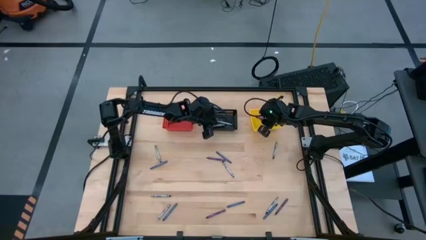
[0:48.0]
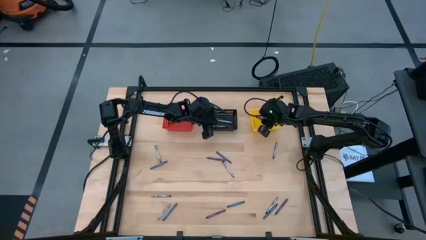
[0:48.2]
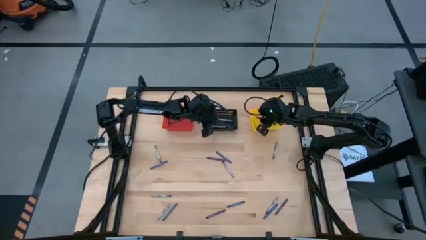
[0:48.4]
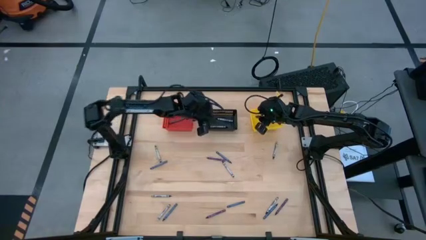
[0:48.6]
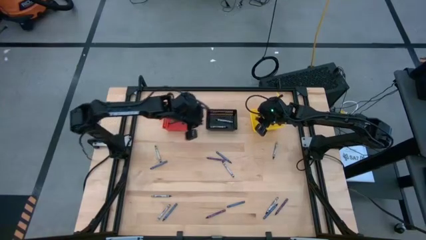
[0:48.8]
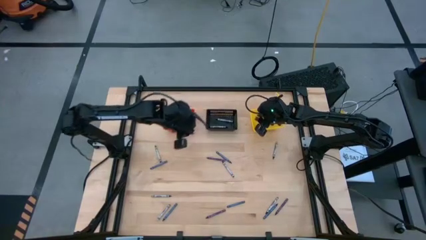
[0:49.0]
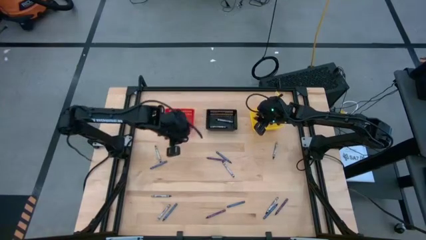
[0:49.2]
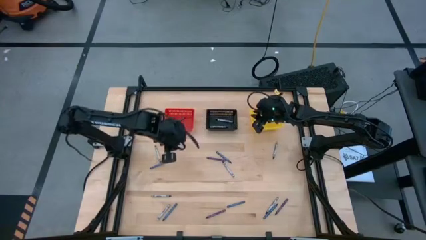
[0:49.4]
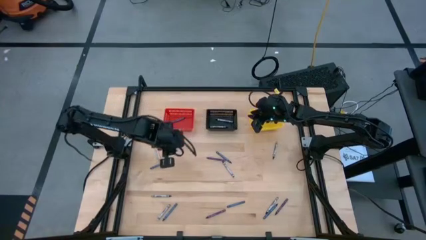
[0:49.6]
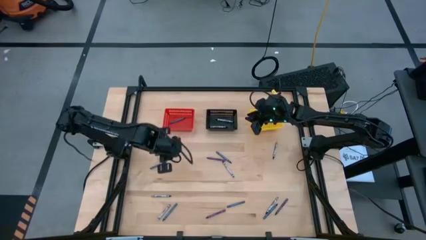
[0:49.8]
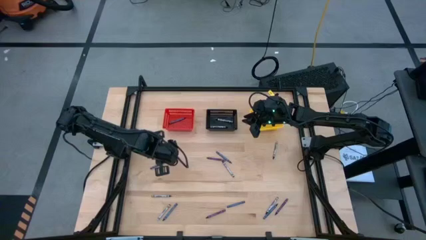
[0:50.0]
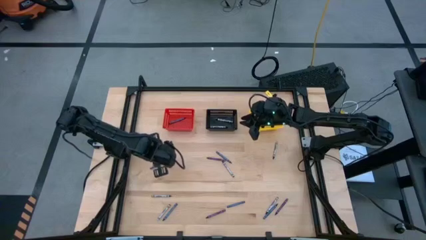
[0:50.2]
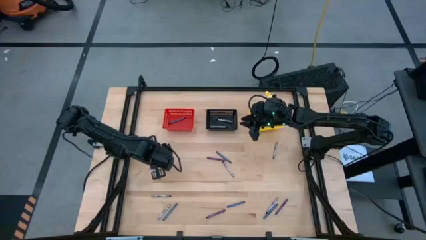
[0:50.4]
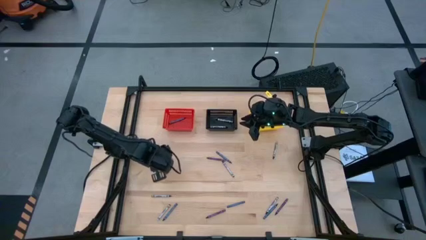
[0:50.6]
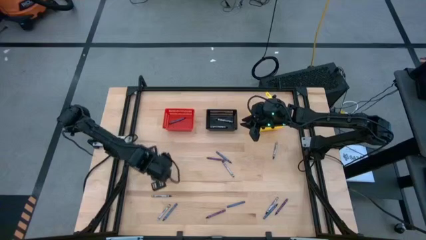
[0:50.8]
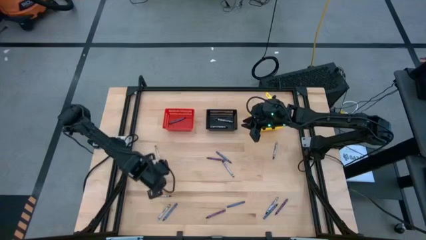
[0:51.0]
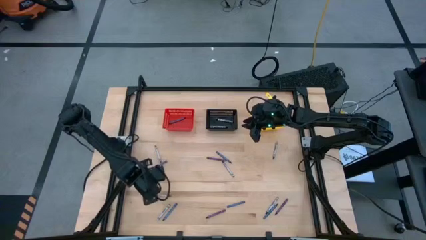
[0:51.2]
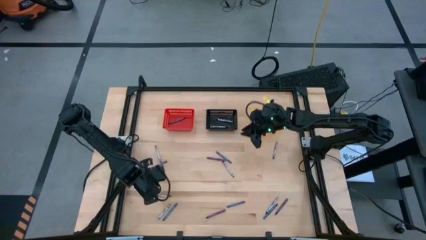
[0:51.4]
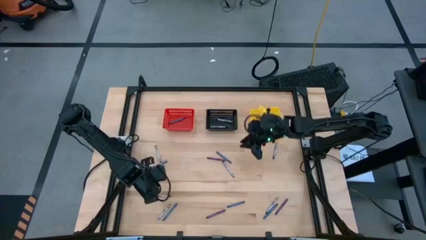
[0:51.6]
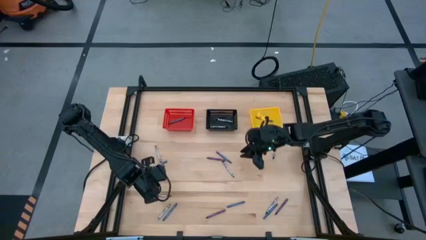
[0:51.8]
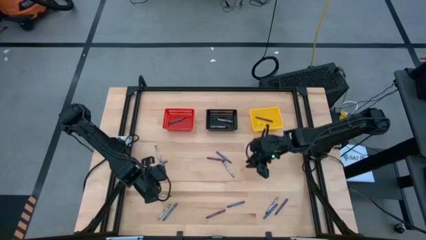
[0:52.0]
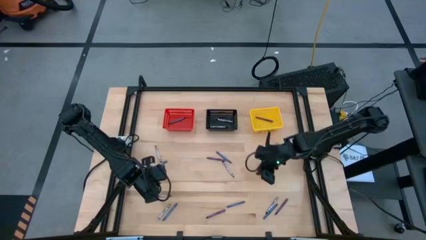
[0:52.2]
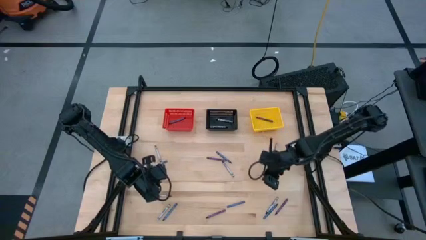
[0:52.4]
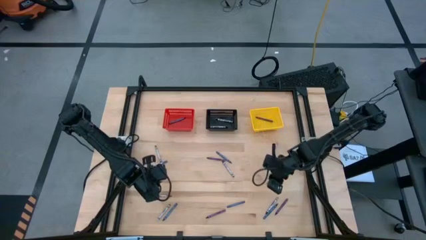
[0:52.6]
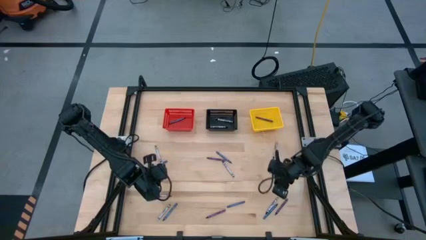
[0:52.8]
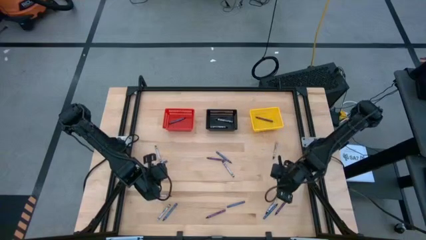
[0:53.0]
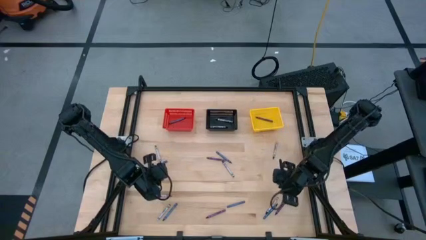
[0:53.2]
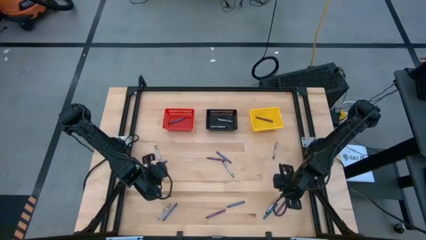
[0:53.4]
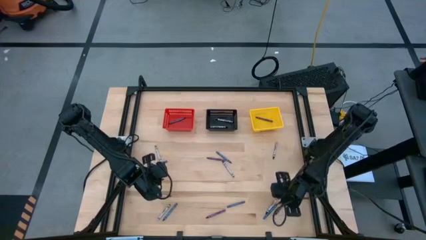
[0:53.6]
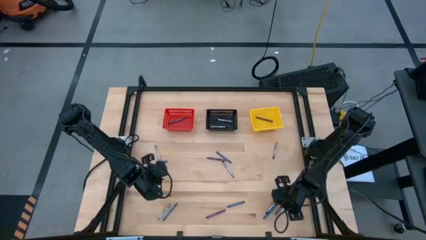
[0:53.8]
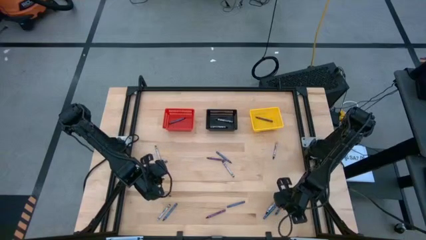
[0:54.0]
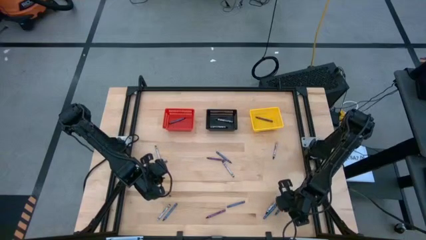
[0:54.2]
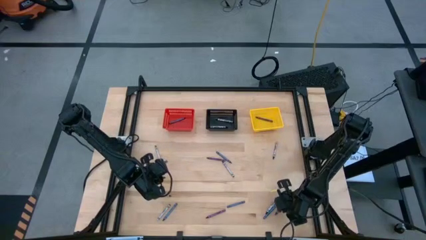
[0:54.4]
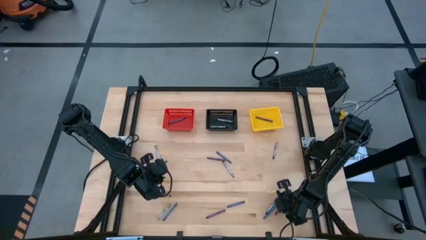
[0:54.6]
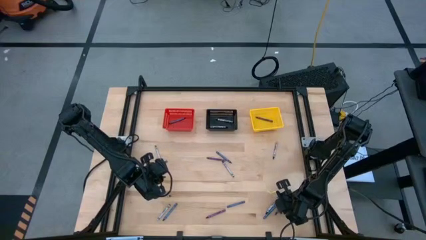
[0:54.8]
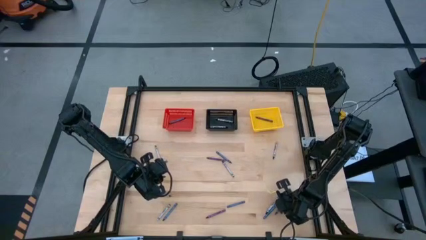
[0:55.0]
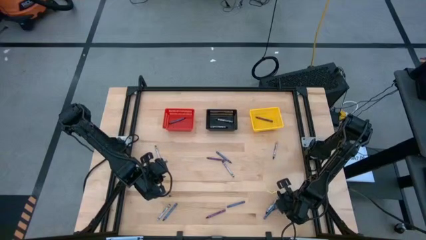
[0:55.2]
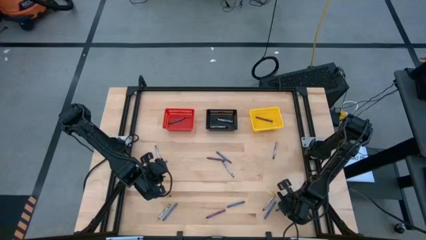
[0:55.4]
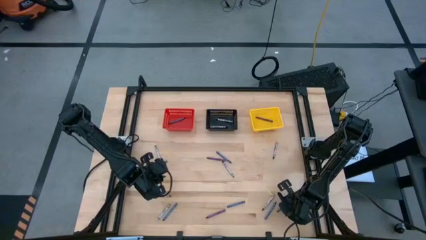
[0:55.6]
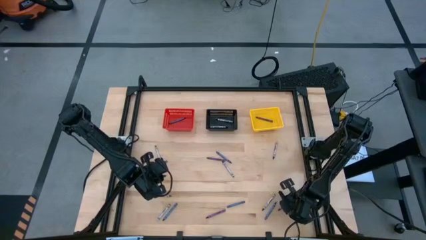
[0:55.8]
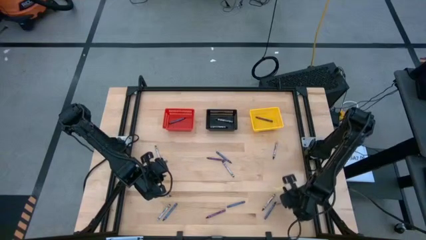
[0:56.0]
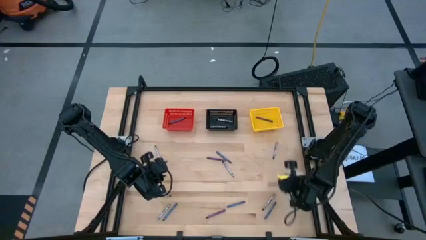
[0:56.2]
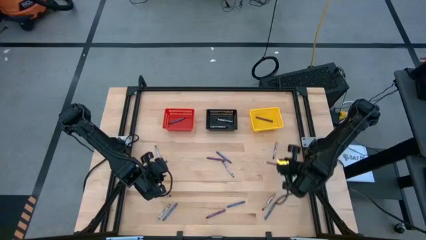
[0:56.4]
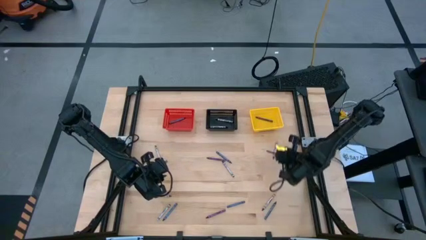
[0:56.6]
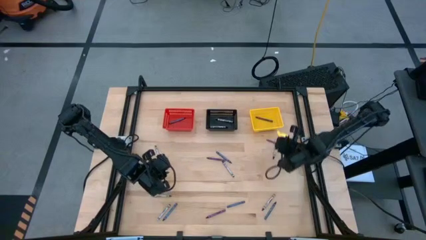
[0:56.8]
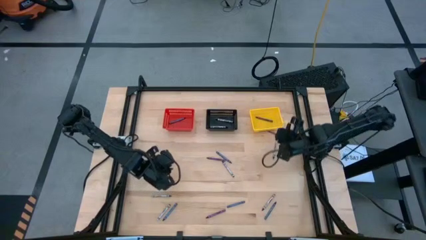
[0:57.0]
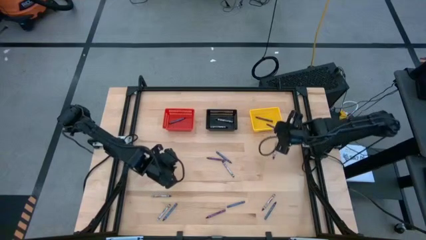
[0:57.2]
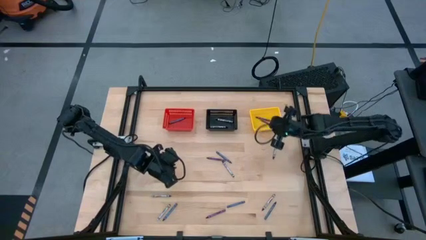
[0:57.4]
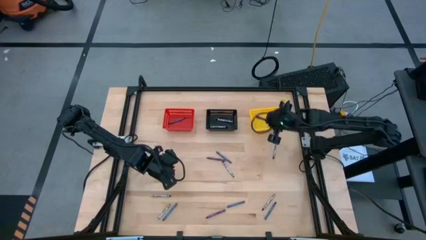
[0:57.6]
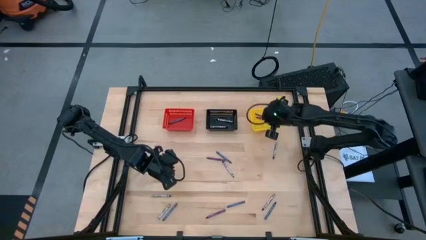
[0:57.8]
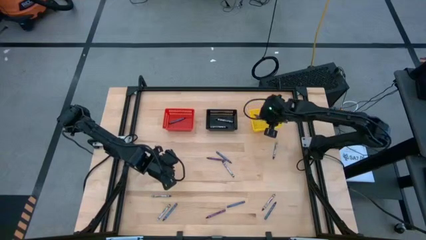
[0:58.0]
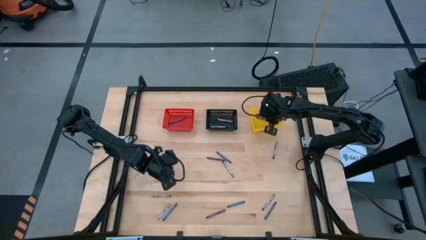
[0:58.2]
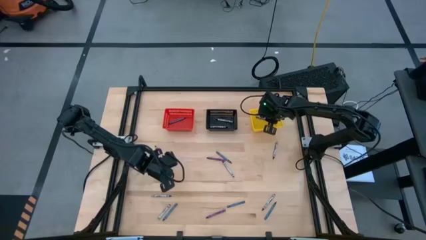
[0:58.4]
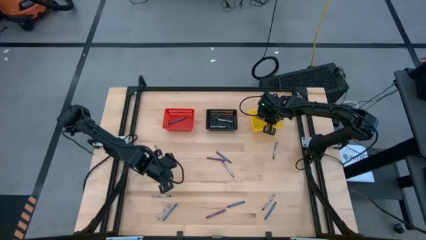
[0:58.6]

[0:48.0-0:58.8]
Task: Sort crayons
Put the purple crayon into the yellow basket

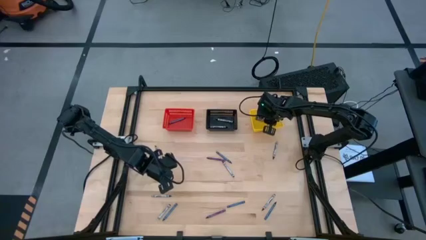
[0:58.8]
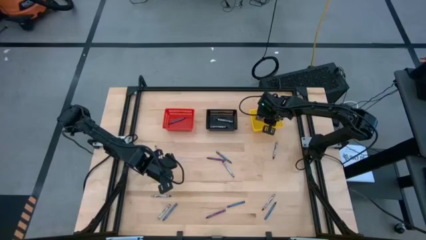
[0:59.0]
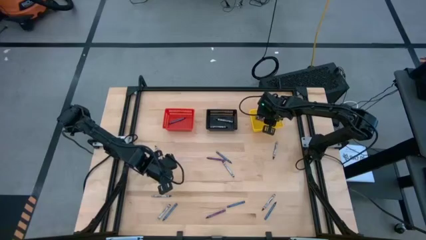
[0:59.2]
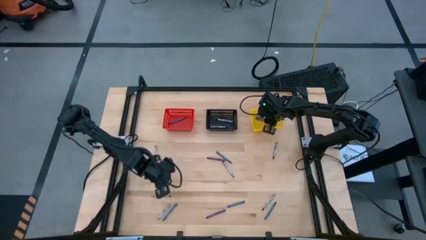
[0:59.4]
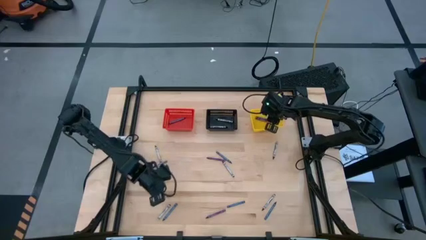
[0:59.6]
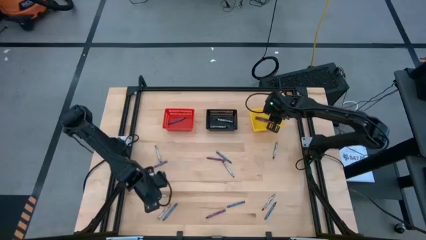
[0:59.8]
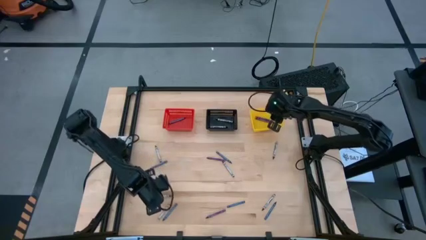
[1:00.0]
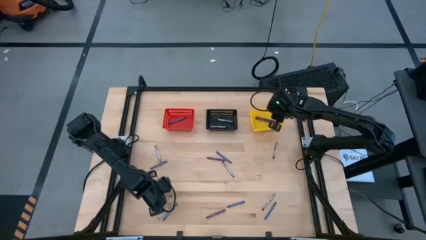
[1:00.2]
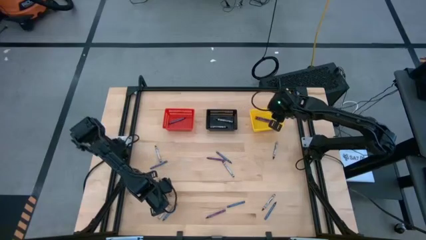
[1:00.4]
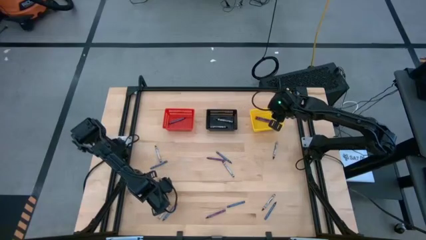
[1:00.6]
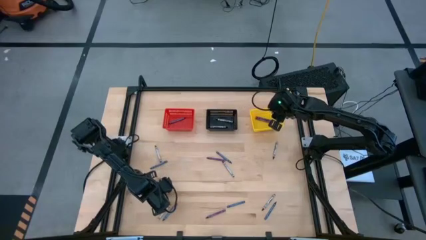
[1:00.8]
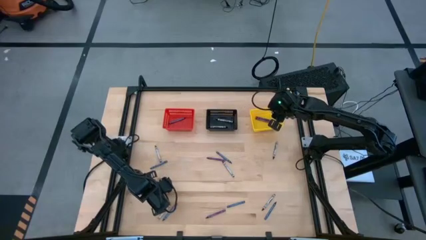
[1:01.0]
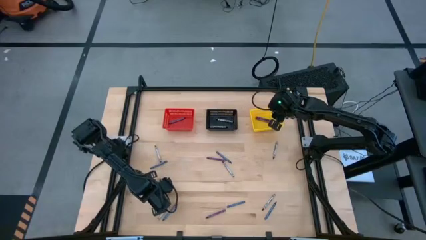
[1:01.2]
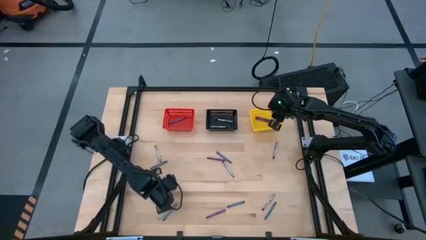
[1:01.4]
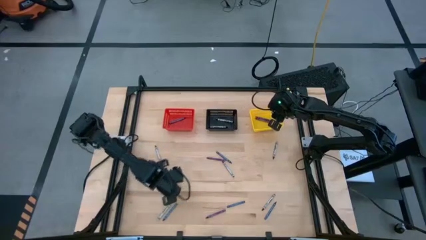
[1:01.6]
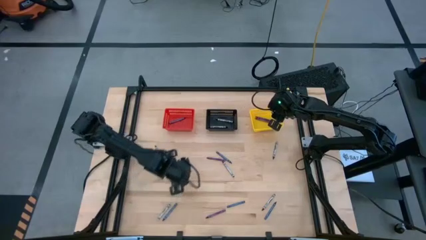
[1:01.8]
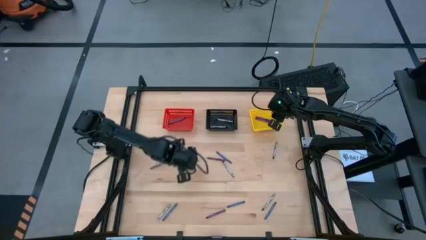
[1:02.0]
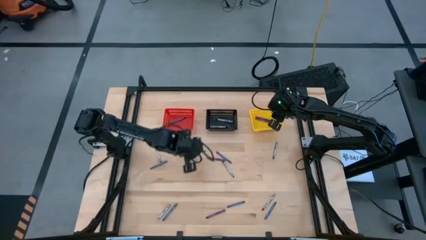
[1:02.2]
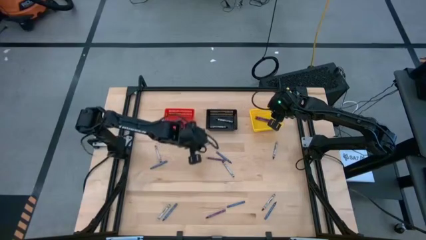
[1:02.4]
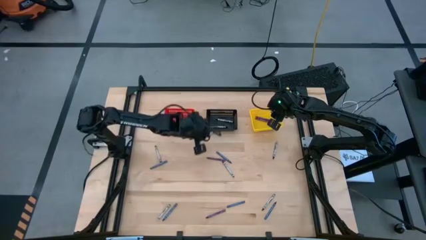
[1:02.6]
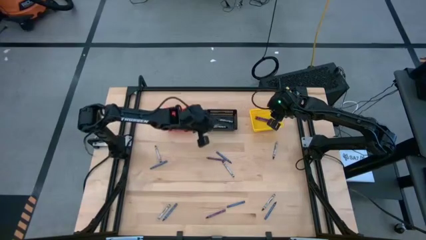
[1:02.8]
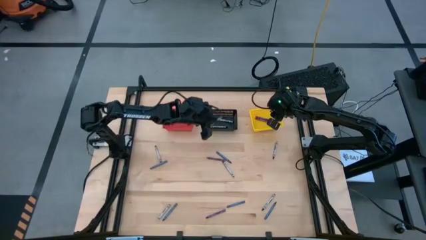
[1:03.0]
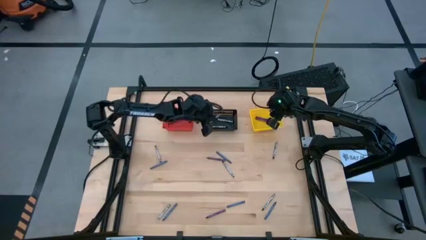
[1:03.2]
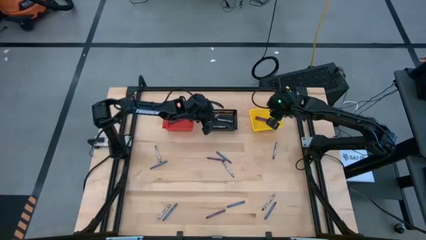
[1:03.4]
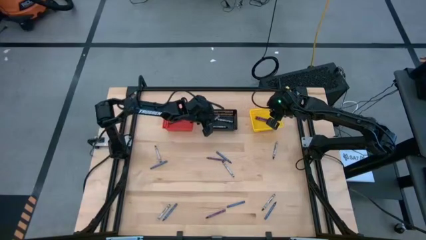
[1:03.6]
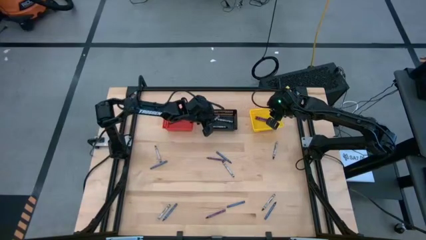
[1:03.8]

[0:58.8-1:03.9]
Put the black crayon into the black basket
